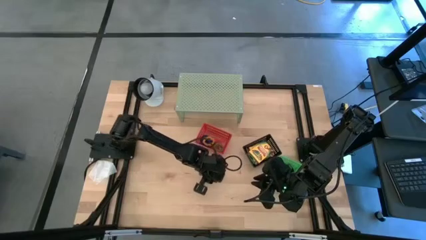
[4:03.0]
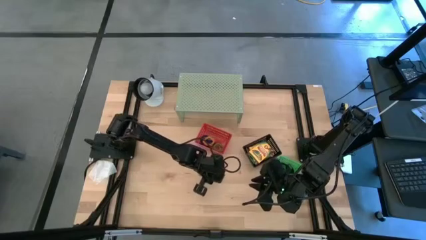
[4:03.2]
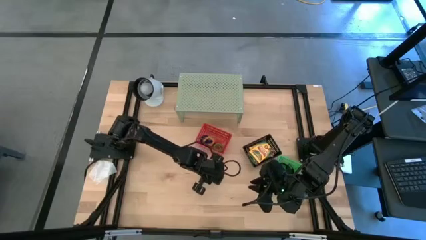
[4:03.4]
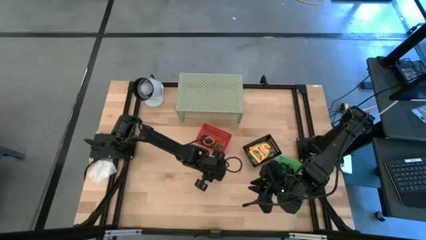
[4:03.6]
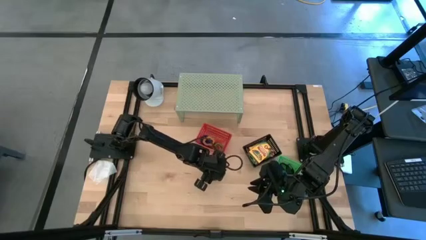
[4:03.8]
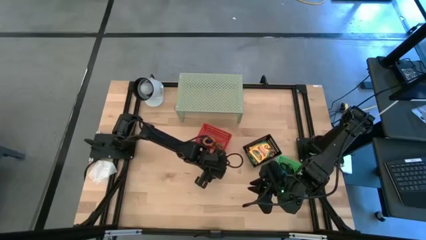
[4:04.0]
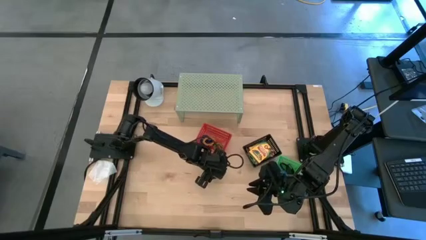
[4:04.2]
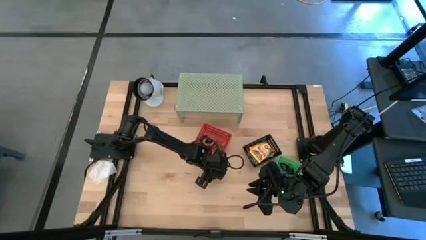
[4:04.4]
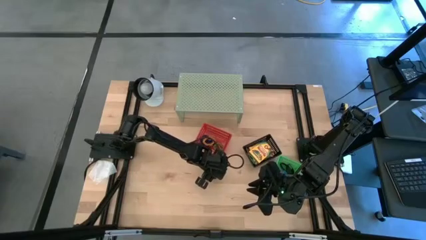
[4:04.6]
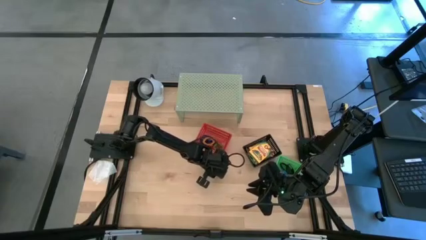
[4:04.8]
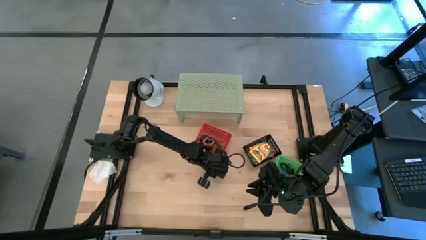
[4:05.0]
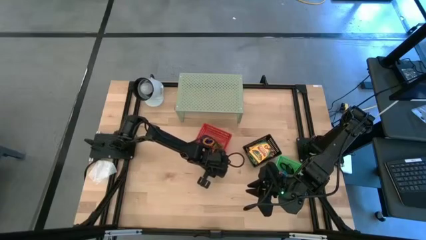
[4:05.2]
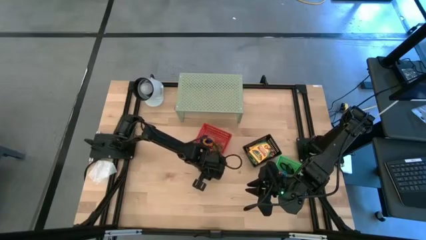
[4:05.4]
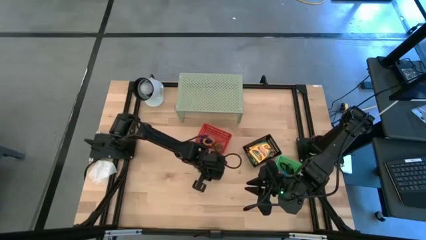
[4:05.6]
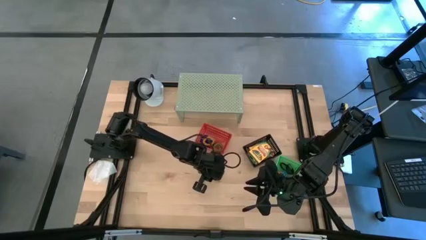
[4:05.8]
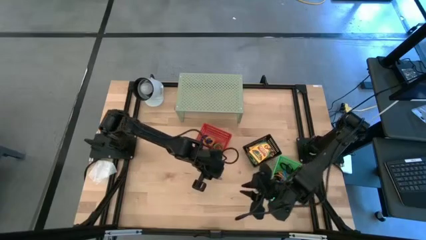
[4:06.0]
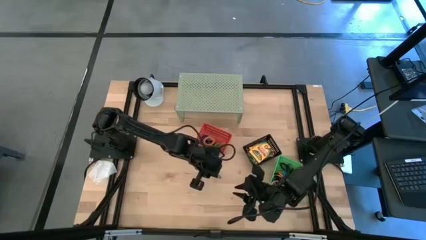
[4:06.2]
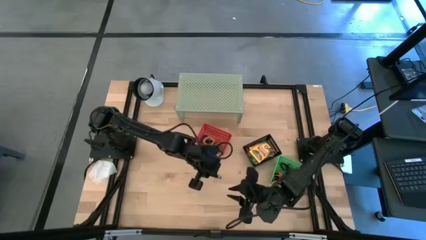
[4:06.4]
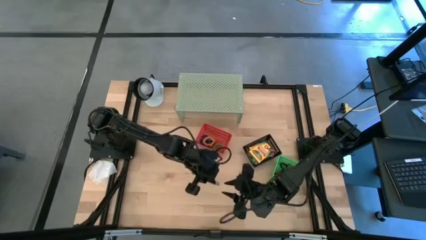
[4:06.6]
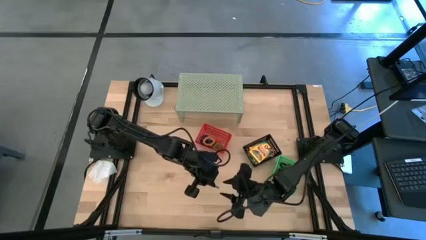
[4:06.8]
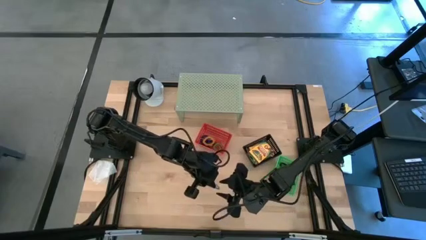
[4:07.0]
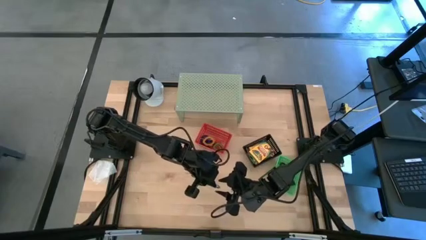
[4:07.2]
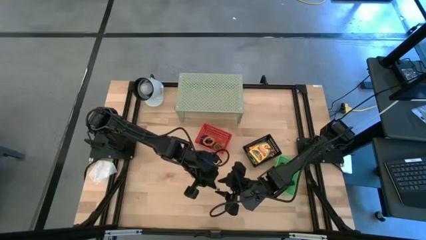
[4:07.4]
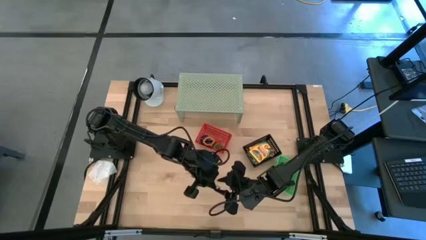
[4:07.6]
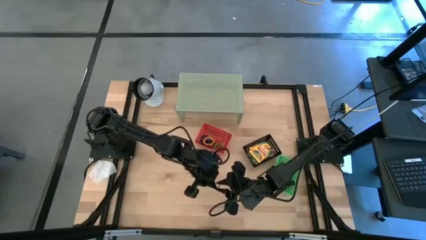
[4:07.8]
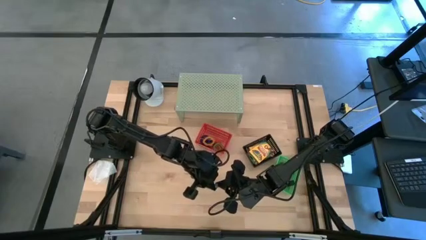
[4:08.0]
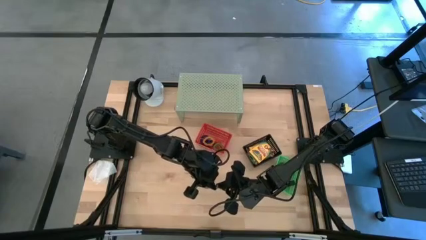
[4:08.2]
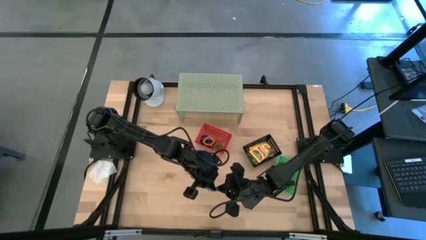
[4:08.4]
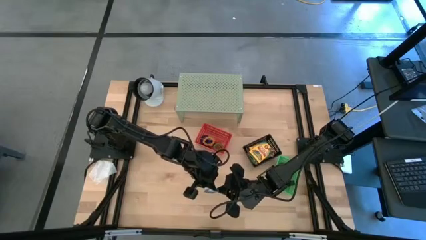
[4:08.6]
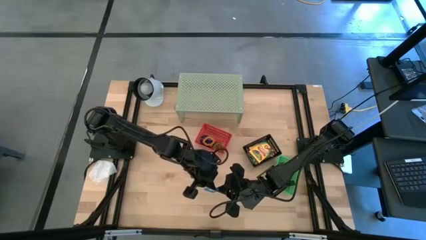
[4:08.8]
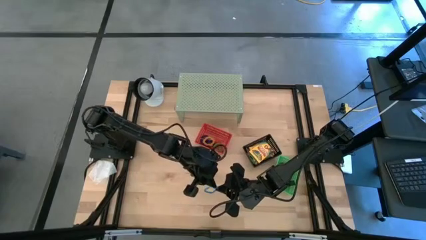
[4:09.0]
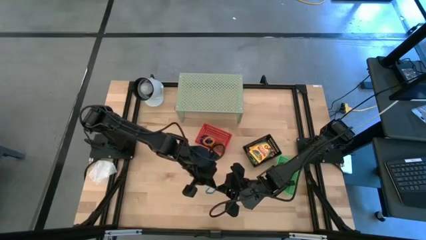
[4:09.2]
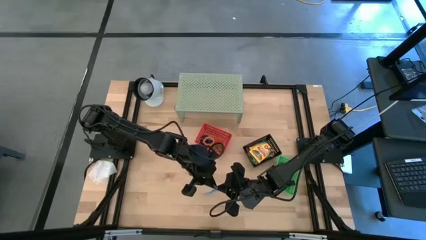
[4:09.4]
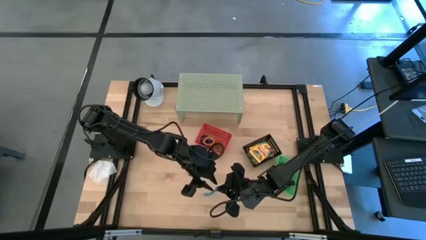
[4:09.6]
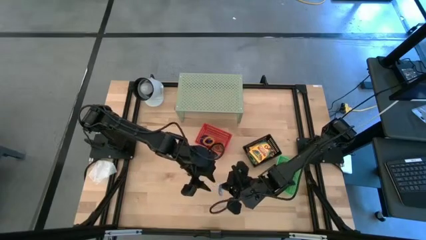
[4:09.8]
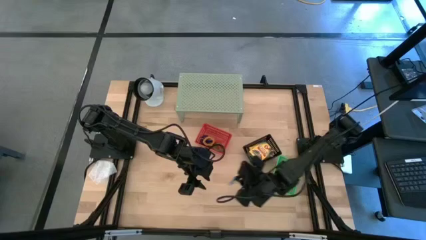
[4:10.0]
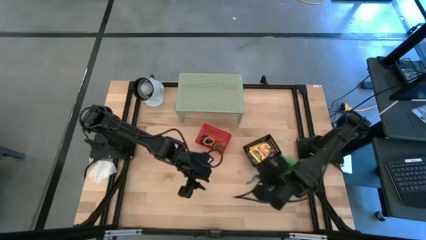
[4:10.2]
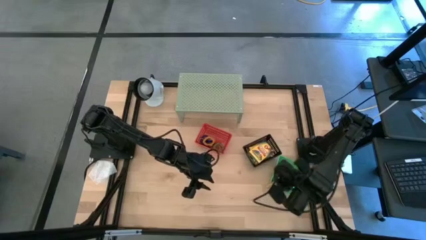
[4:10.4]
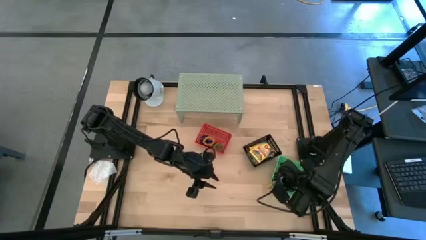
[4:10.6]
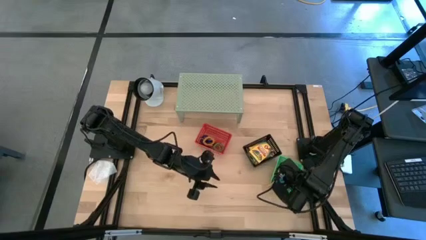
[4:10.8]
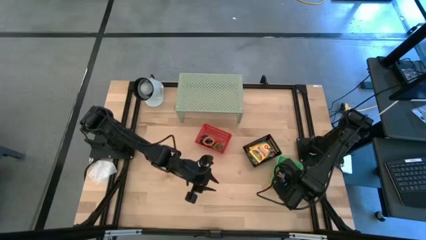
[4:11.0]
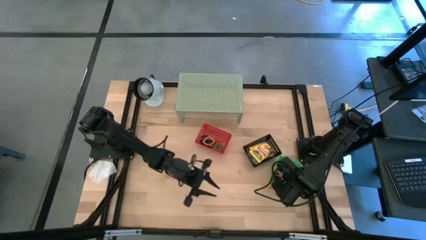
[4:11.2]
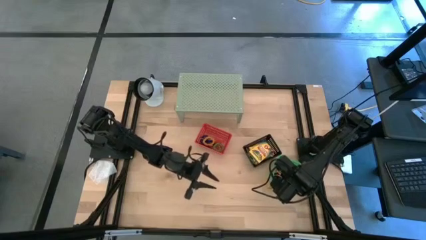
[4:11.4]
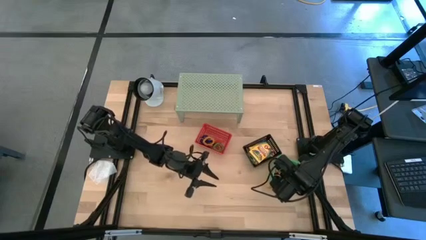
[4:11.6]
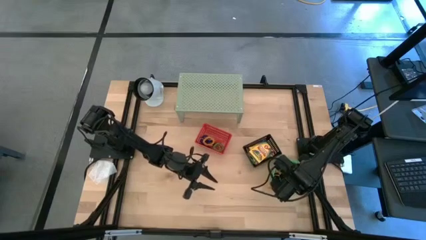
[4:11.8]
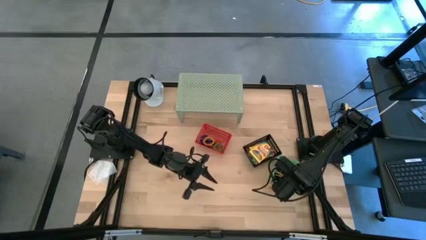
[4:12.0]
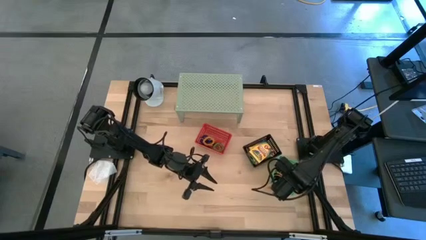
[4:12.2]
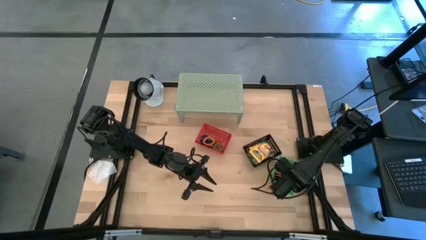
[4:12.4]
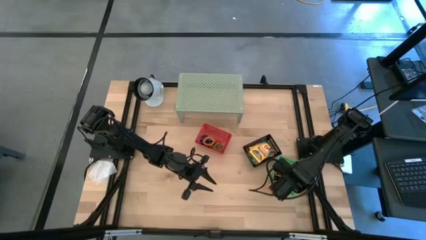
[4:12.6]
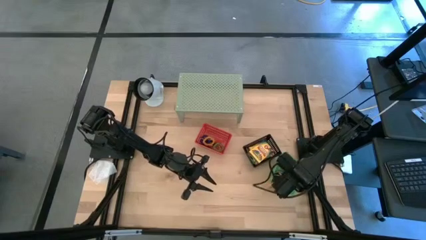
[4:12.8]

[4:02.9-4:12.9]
Task: Pick & Place Office Desk Supplies
Put the blue rubber band into the green bin

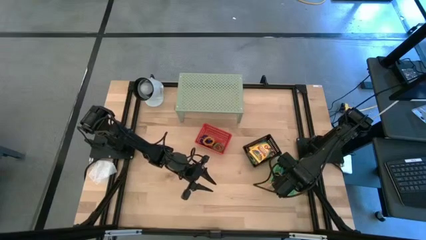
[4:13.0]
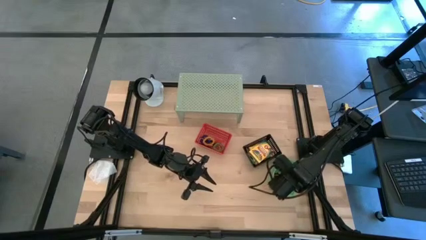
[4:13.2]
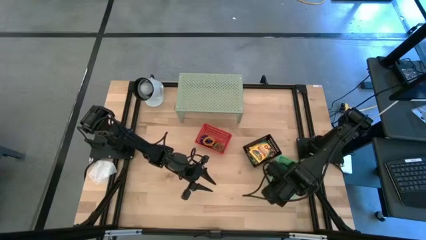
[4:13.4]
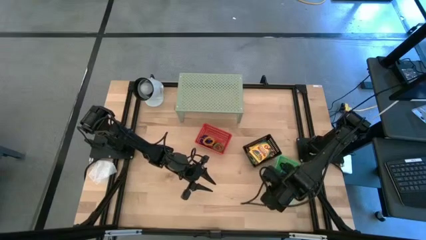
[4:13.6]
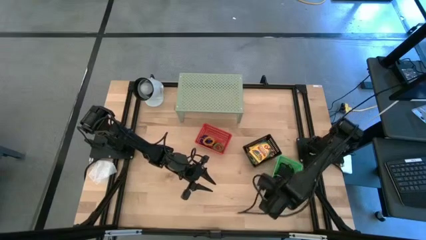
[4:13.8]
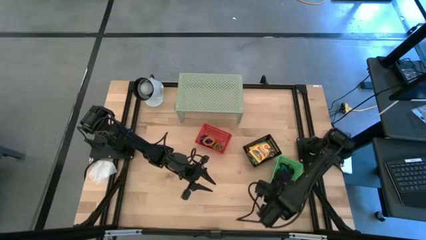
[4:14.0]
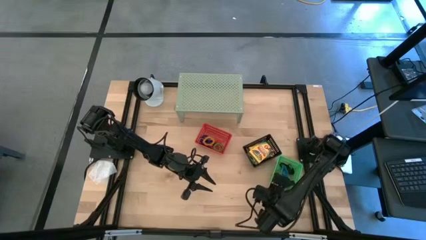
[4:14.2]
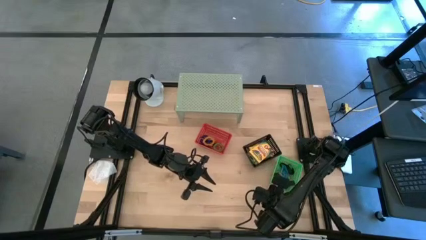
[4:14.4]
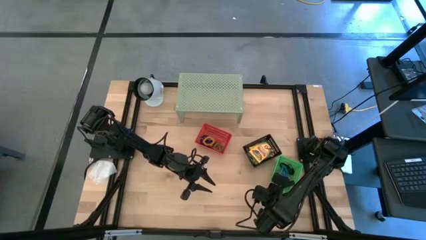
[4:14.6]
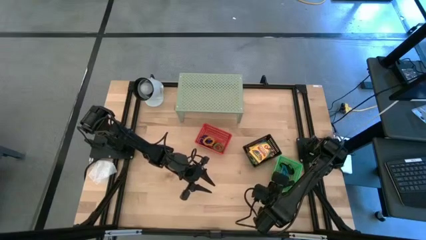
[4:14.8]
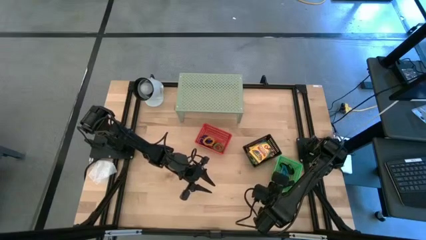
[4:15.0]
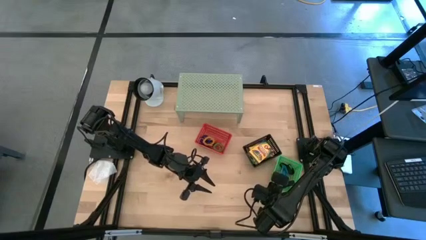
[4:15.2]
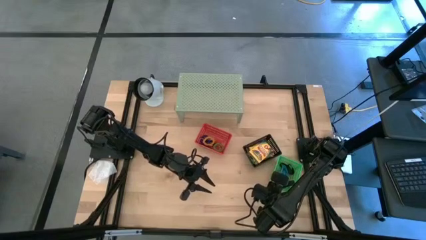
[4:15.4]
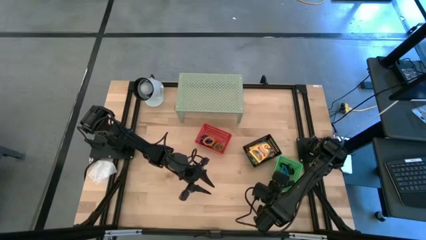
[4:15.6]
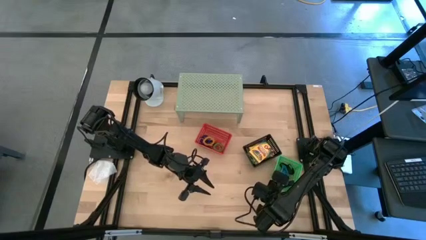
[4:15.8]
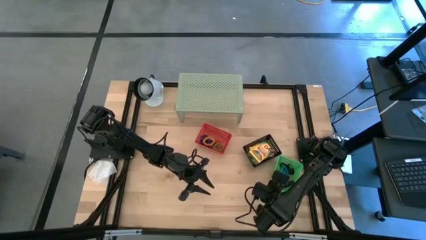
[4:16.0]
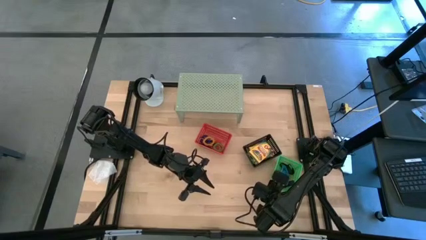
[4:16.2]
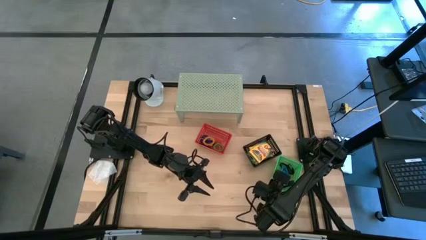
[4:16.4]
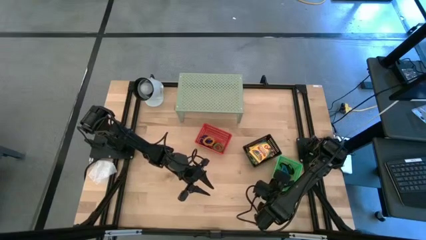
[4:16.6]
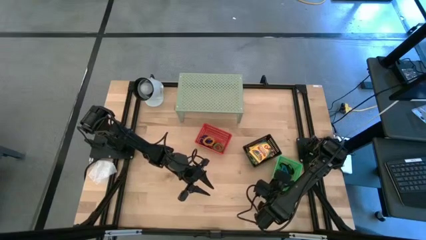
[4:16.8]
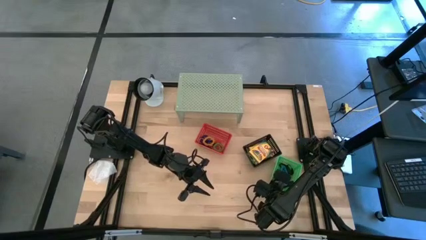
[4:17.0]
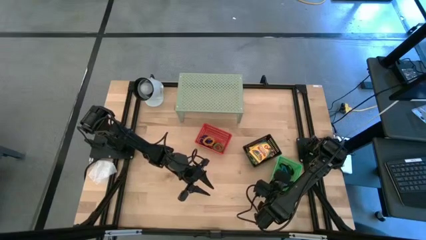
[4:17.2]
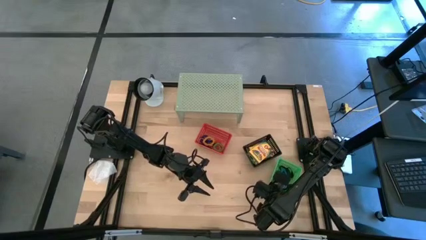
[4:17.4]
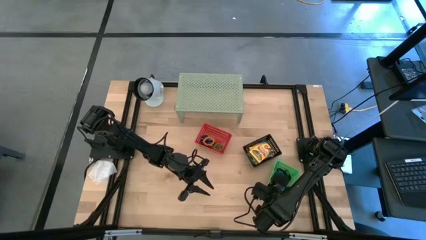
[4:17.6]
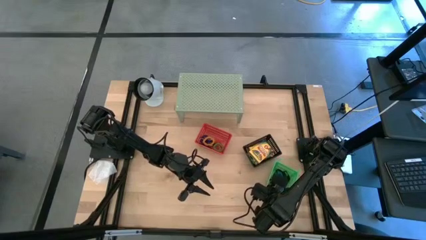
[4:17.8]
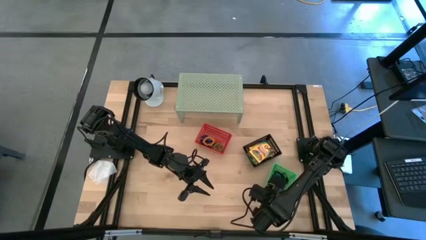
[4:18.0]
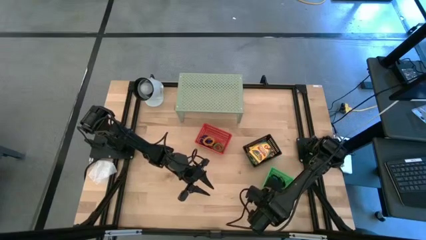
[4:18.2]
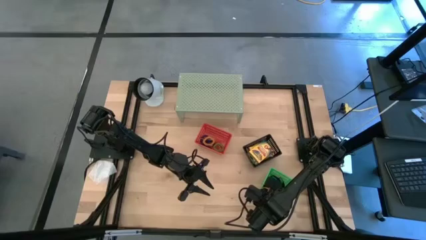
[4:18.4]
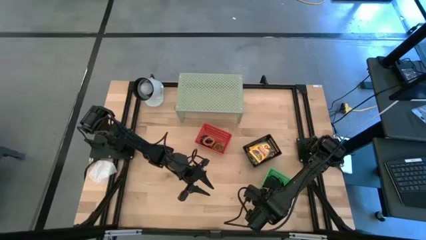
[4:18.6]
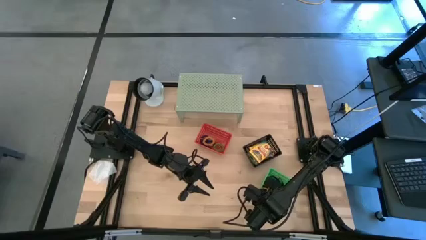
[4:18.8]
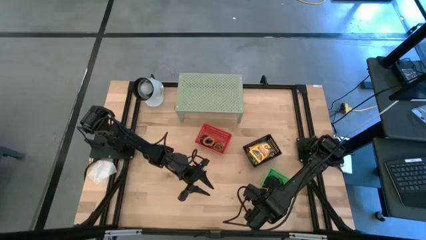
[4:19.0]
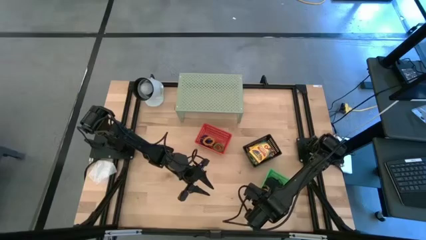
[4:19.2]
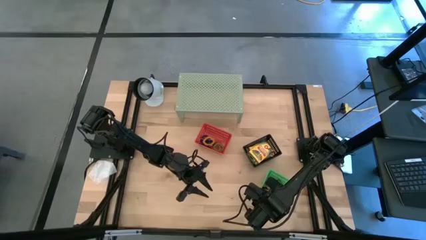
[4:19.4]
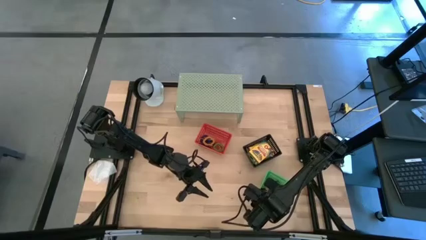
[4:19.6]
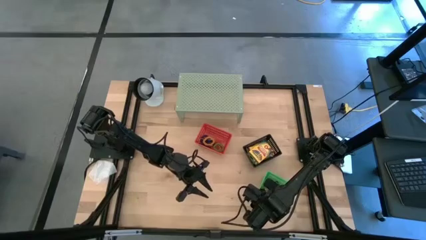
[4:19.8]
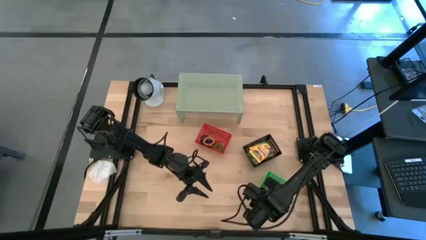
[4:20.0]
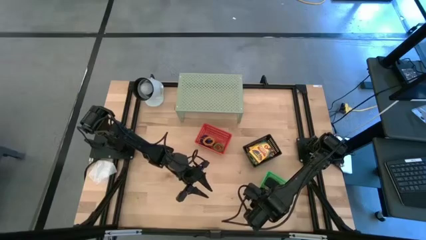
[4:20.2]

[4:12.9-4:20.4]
Adjust the green bin
